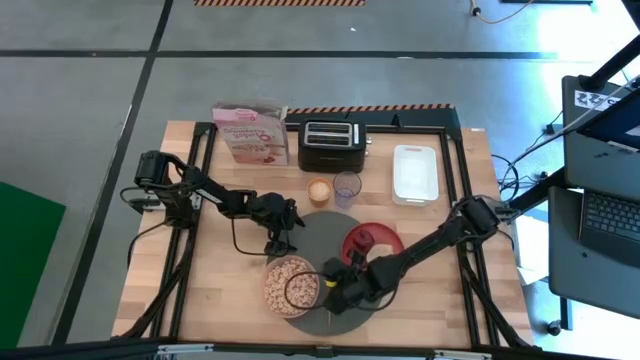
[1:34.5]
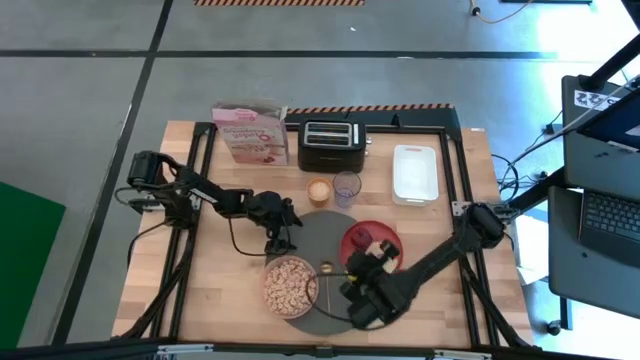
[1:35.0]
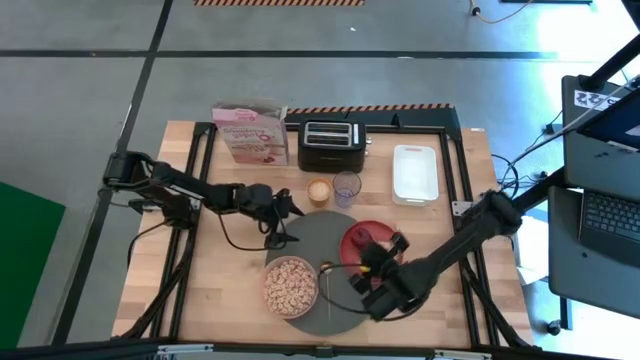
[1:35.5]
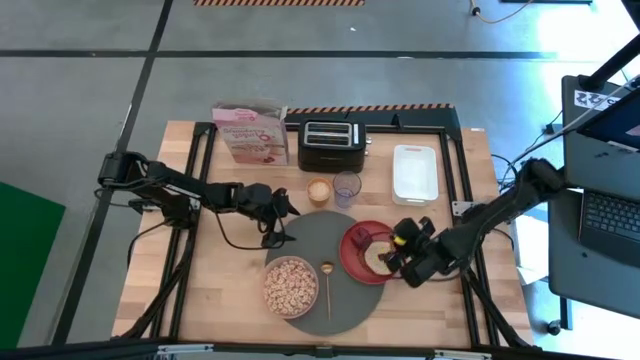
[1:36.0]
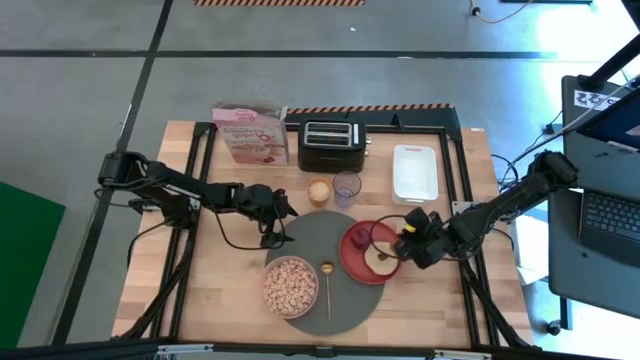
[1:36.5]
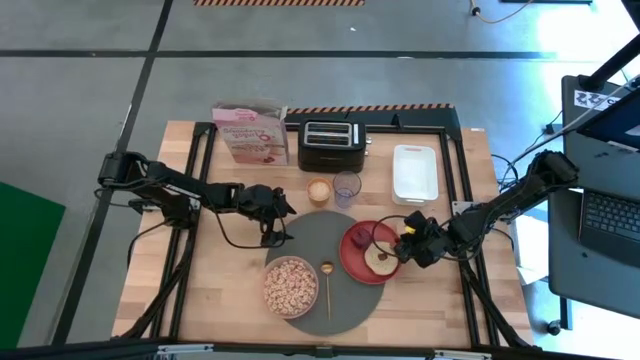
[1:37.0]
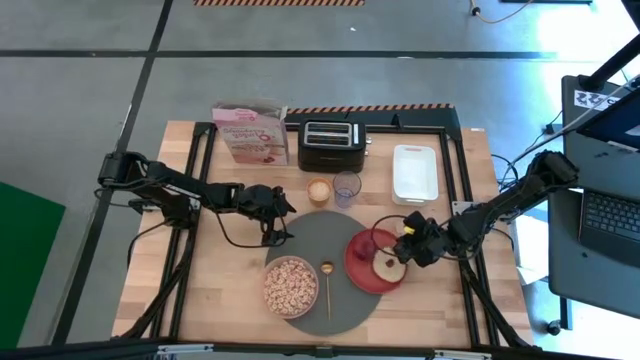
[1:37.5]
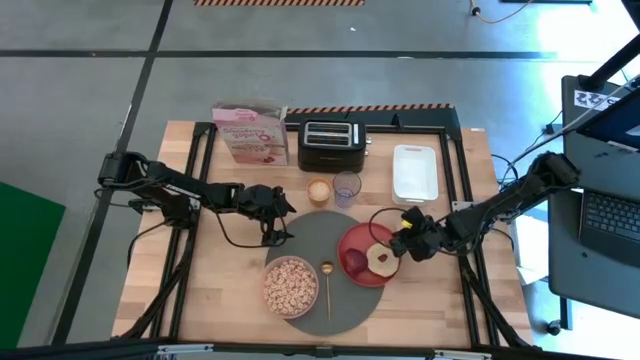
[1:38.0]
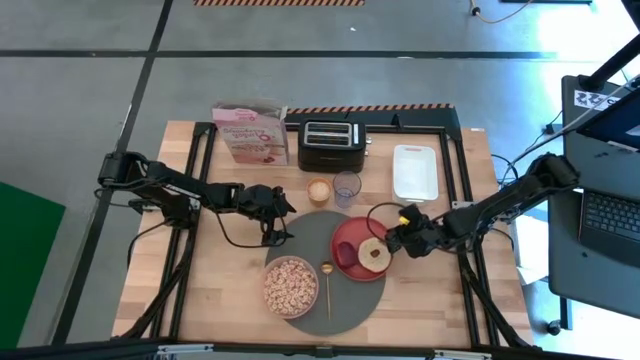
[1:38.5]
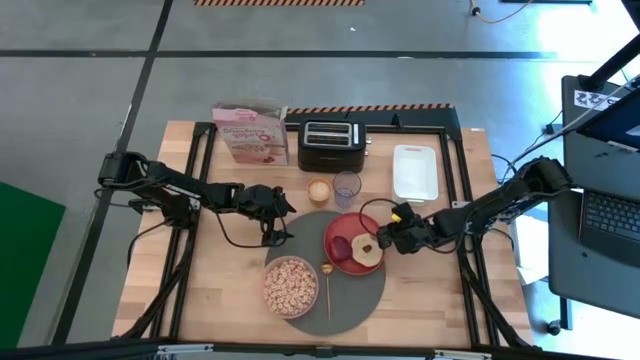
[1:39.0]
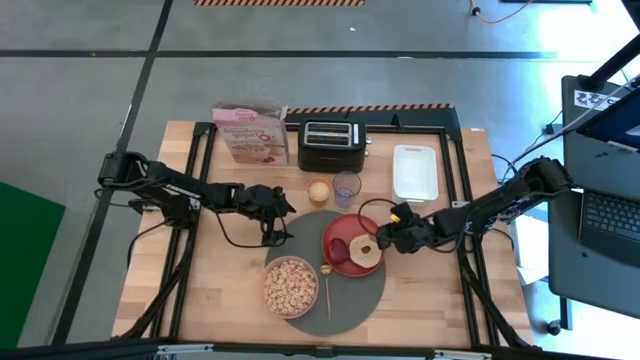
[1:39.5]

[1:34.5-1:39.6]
Task: Arrange a breakfast setting
Adjust the red plate

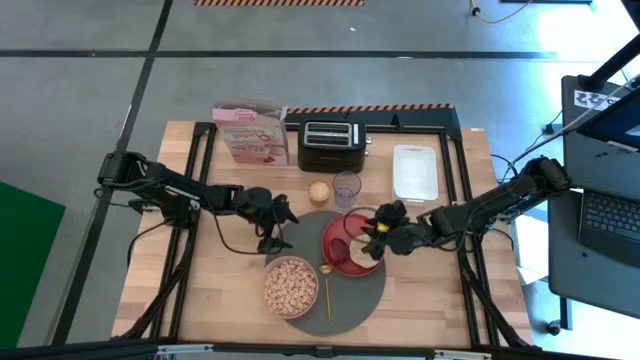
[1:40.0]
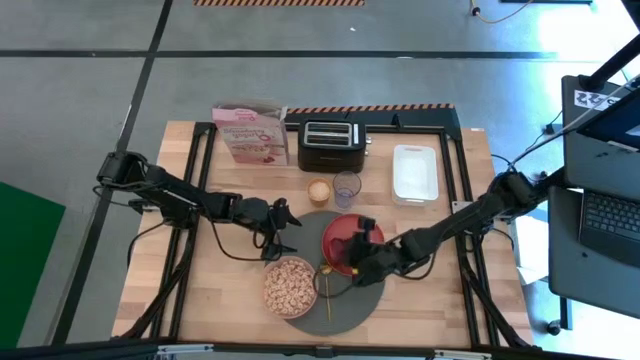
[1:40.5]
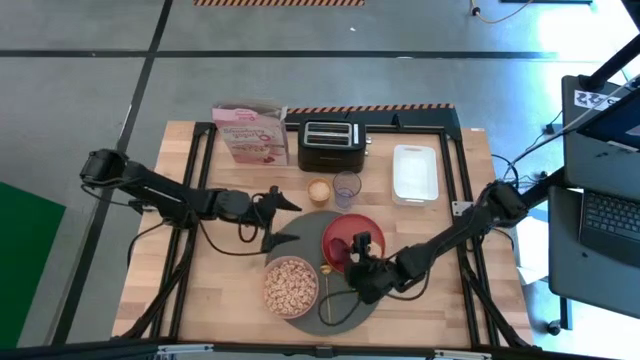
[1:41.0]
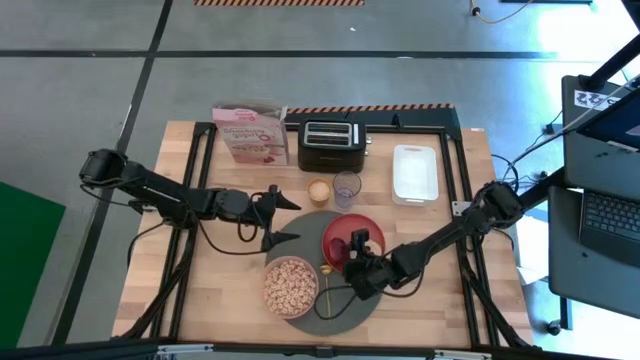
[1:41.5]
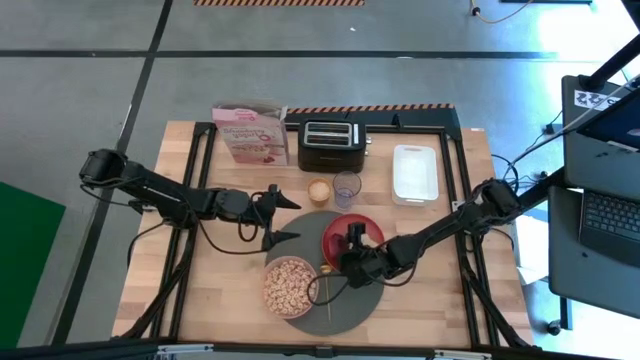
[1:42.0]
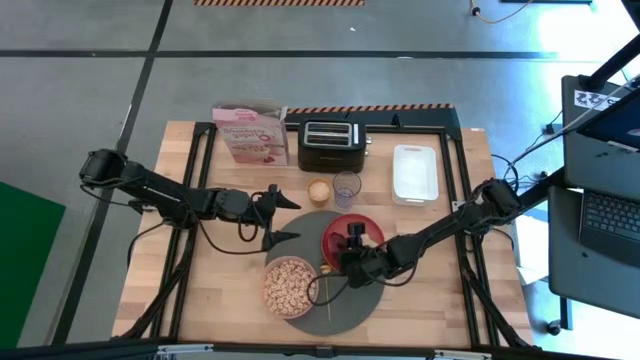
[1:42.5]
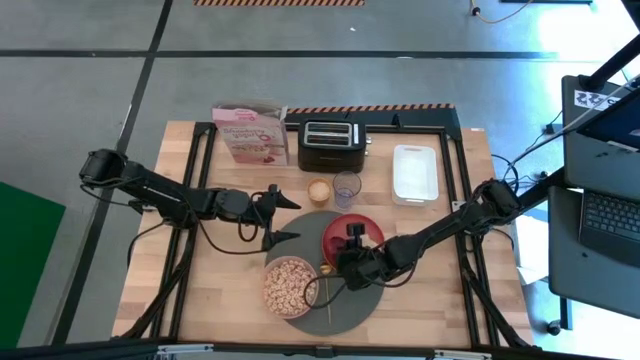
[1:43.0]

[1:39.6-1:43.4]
Adjust the red apple

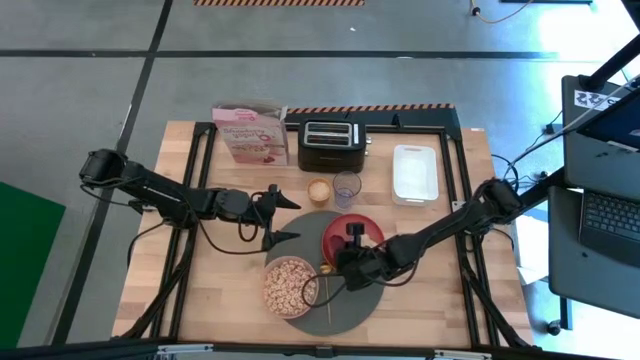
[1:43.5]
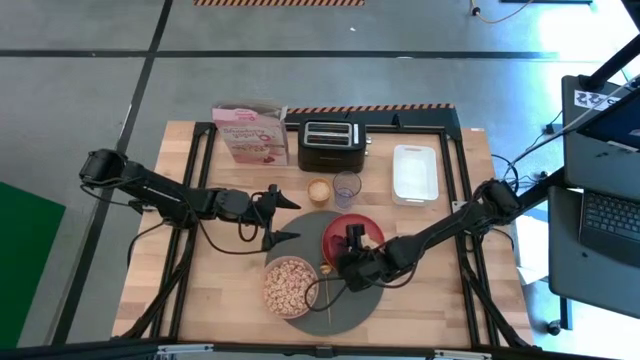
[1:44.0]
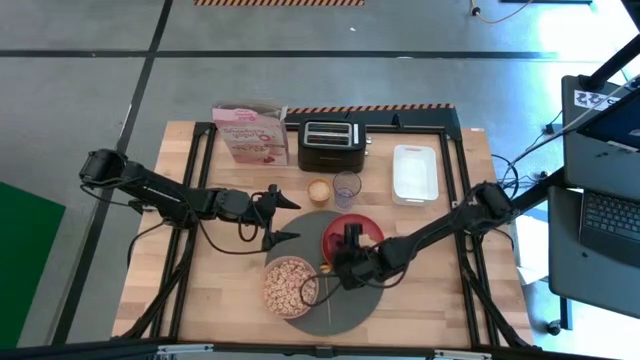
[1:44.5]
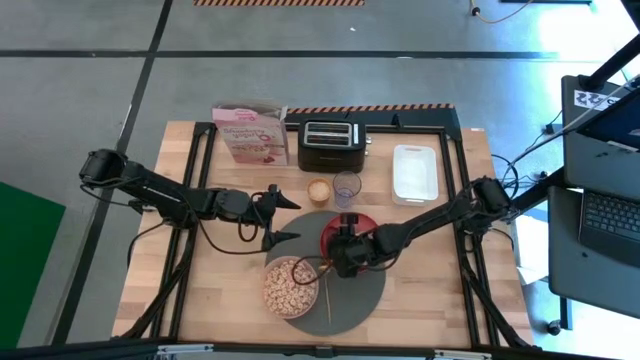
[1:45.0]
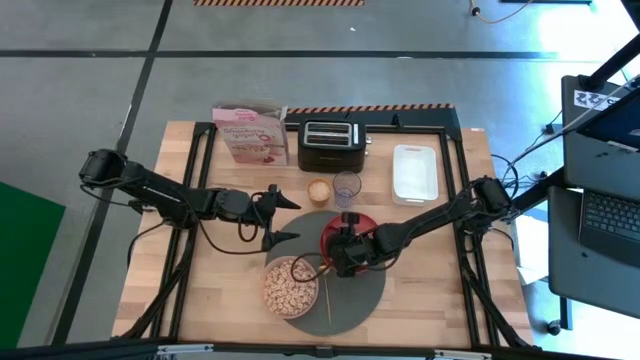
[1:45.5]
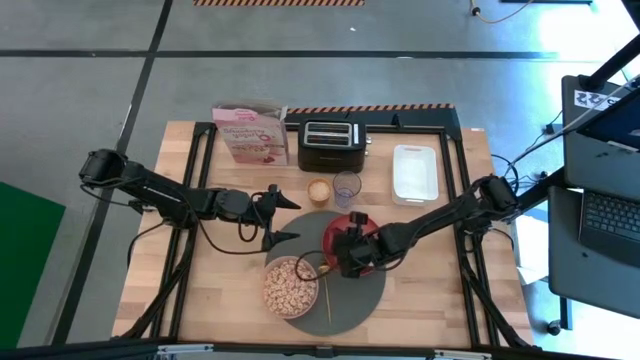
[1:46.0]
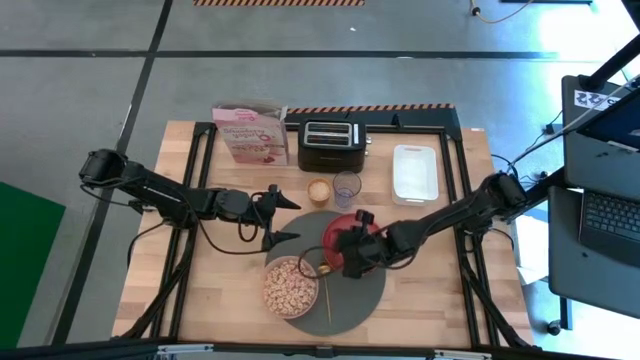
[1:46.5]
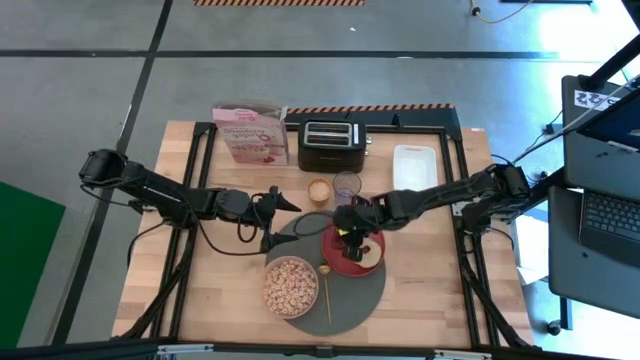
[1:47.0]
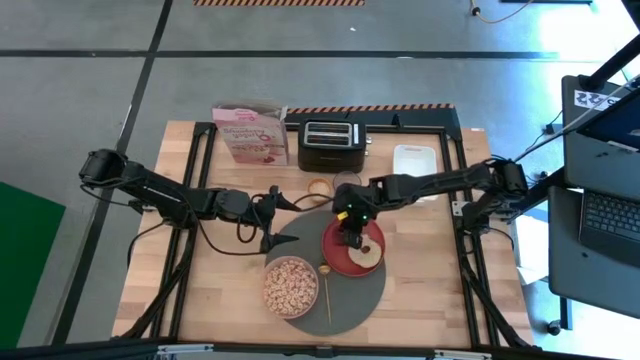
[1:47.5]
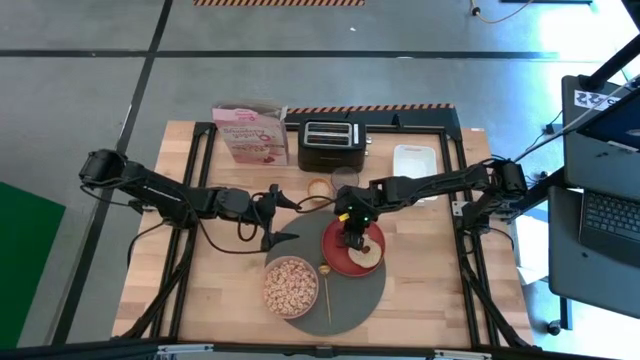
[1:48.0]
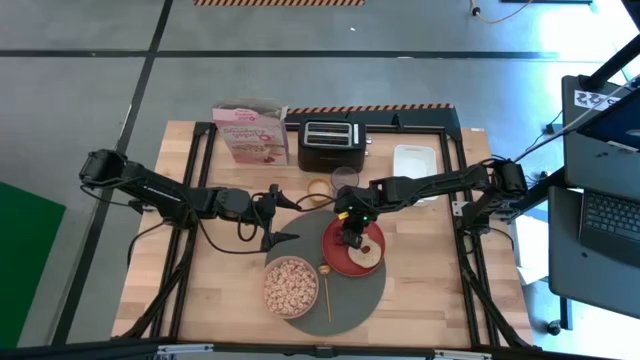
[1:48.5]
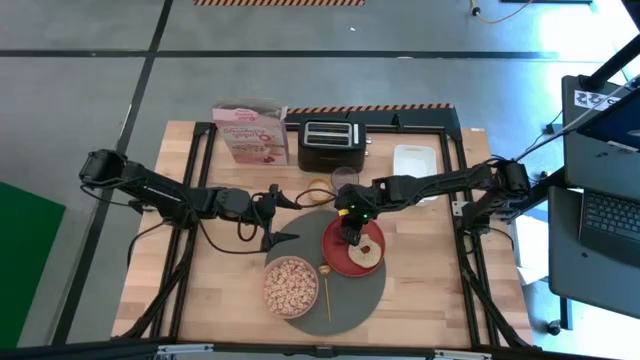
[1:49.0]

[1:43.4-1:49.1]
Adjust the red apple

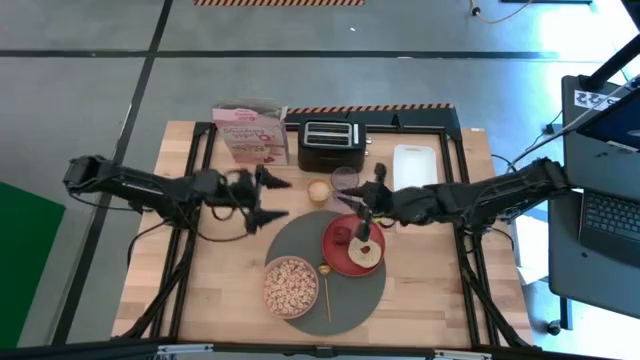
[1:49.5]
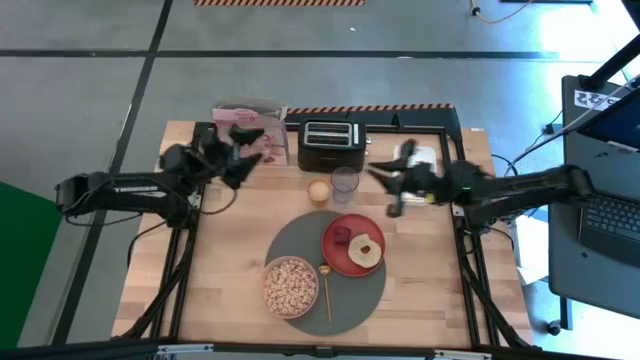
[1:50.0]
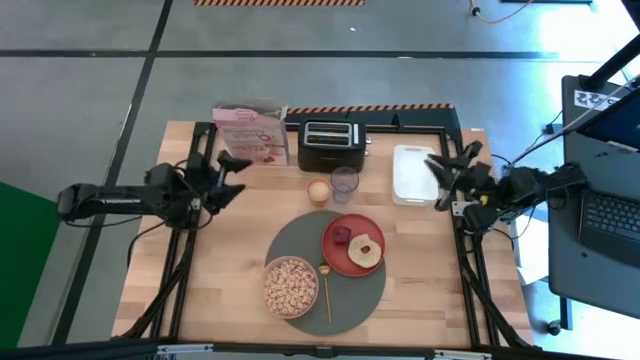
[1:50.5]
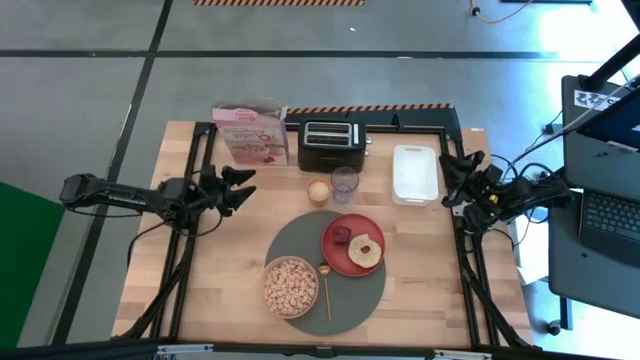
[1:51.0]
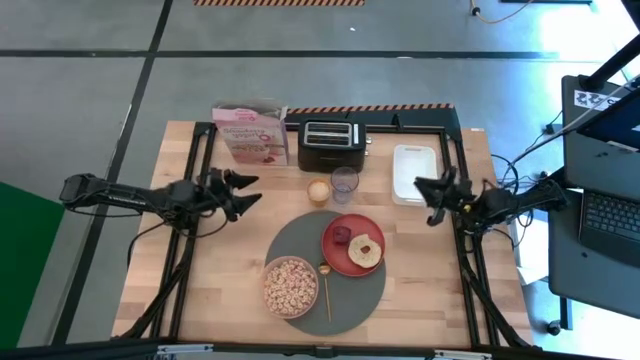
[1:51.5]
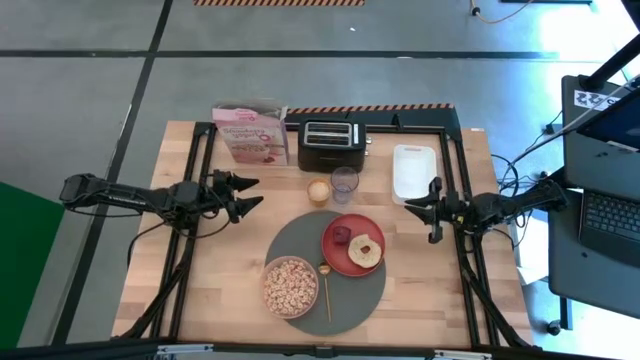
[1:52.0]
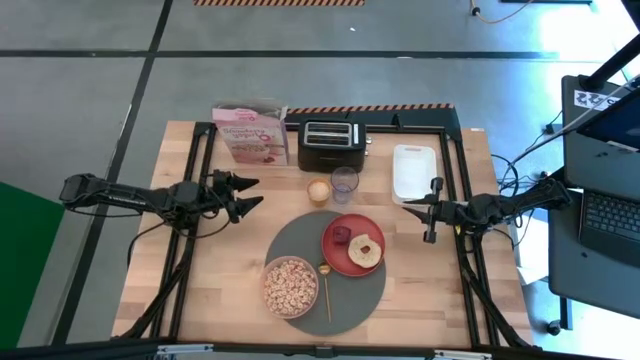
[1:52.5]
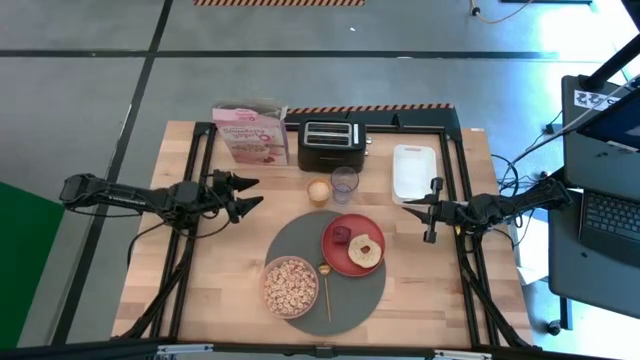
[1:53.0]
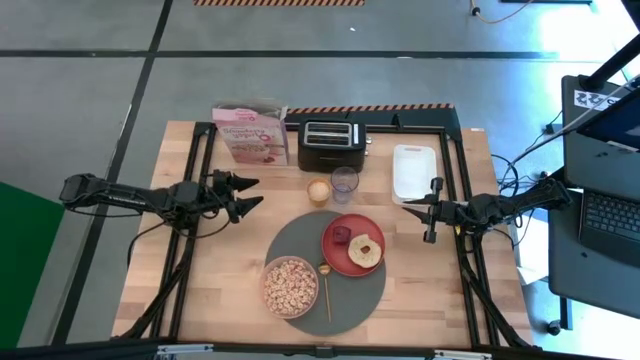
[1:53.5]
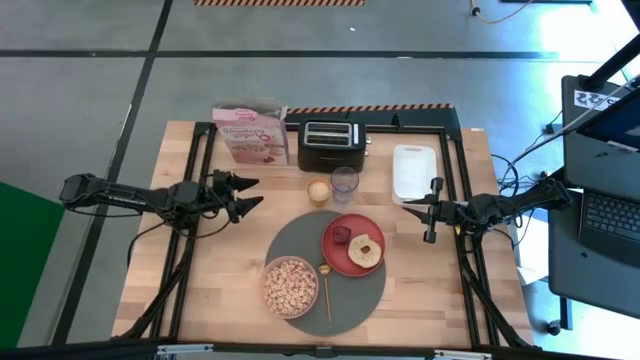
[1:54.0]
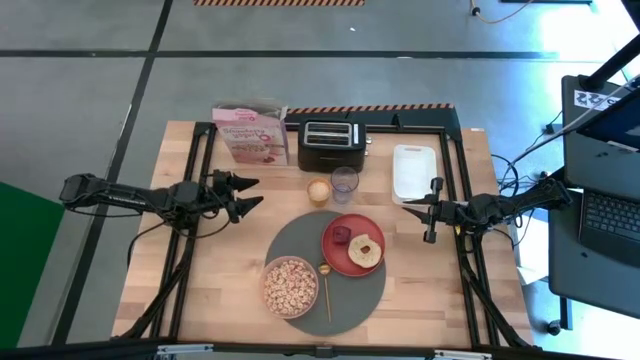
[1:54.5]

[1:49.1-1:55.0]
Return to Home Position

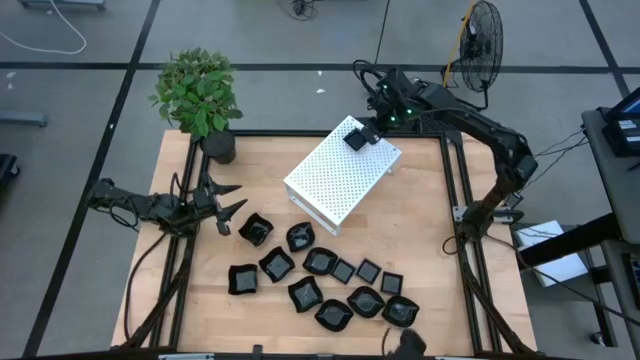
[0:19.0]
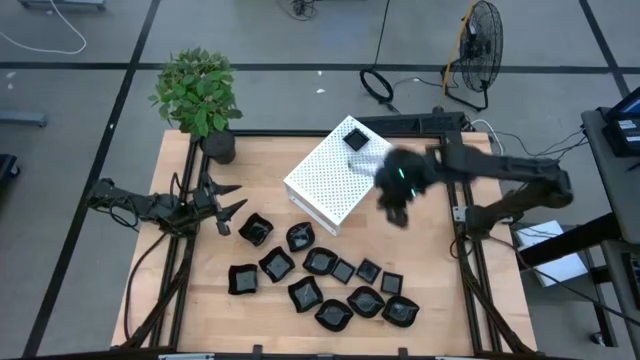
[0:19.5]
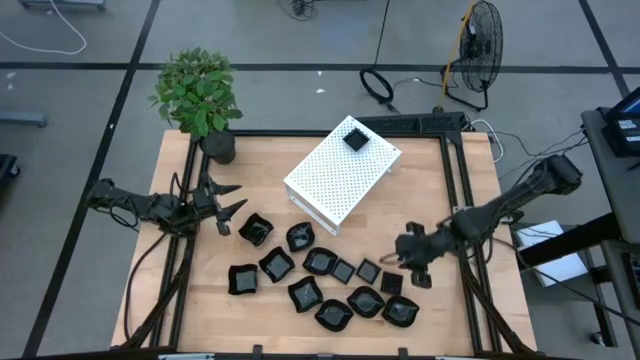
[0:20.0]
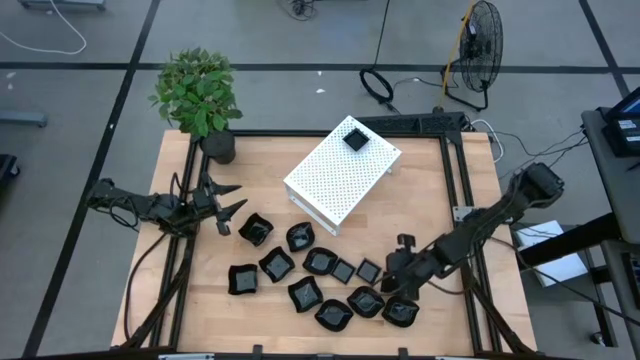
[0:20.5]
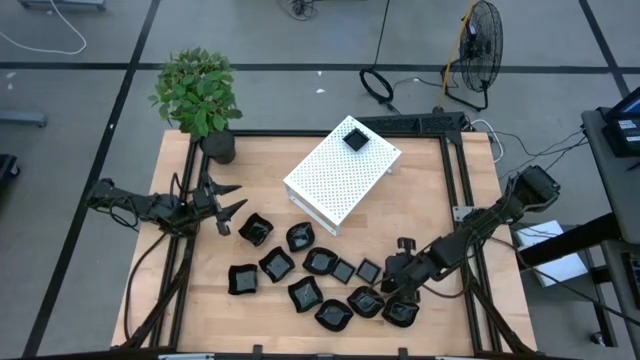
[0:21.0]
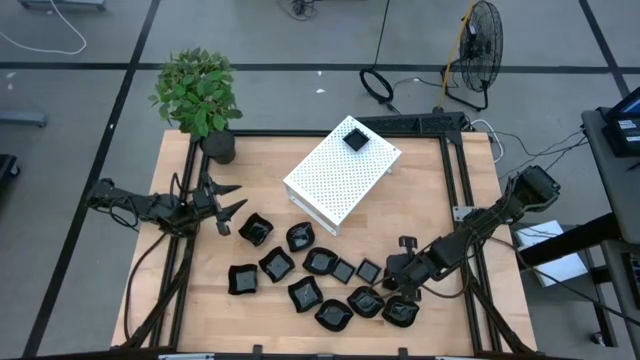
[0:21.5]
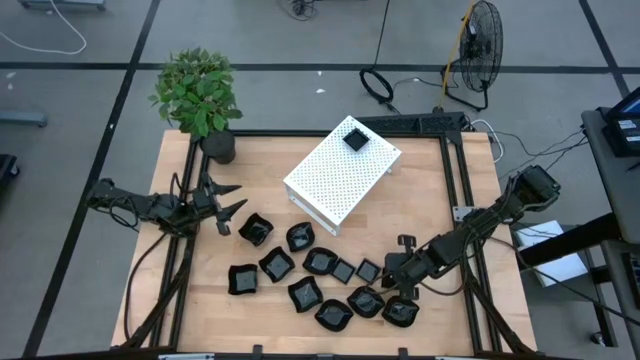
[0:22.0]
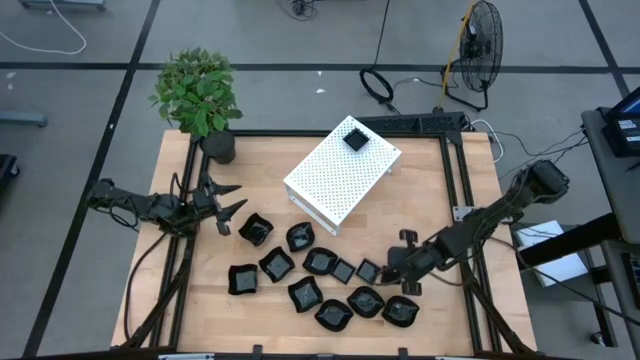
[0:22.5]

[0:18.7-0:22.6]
Task: Pick & Place Mini shaped plates
Stack the black square plate on top of the black square plate on the shelf
